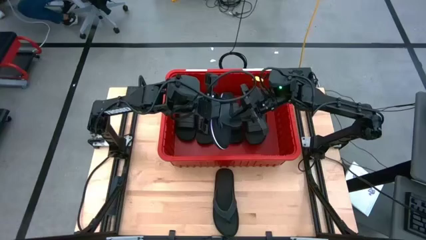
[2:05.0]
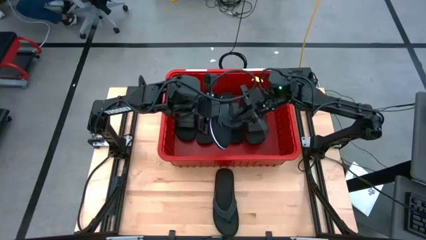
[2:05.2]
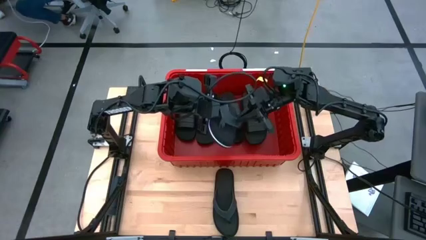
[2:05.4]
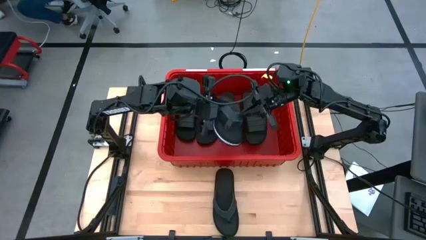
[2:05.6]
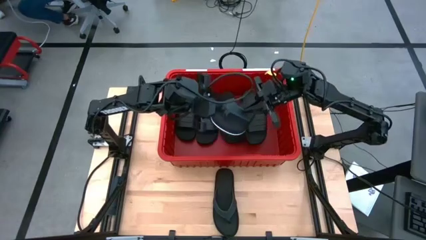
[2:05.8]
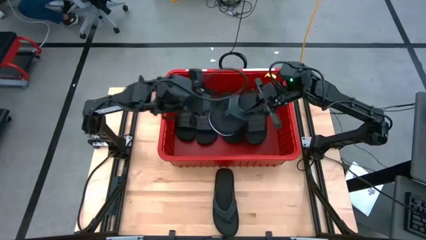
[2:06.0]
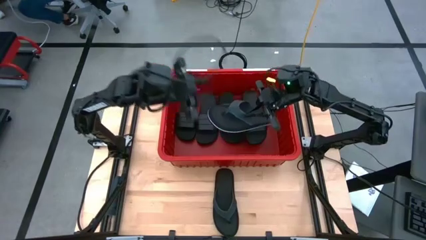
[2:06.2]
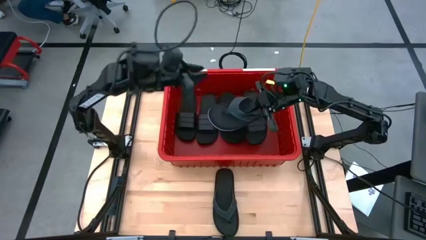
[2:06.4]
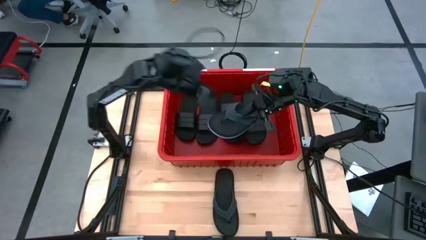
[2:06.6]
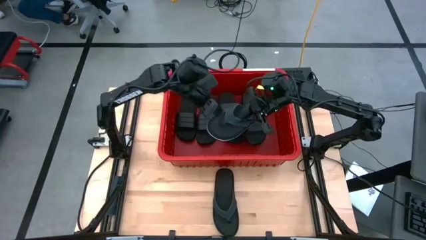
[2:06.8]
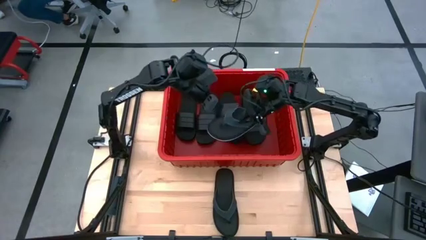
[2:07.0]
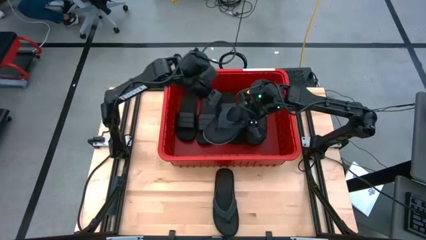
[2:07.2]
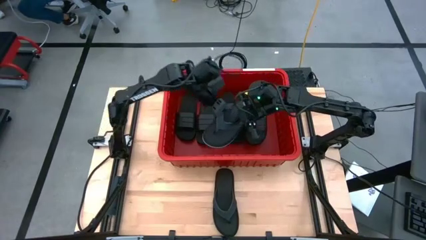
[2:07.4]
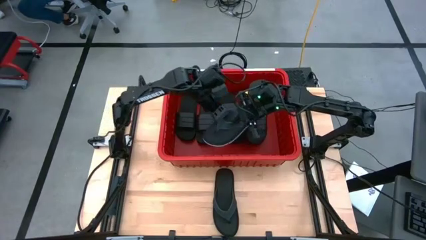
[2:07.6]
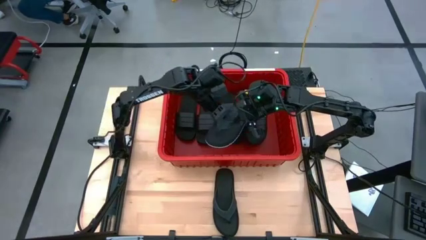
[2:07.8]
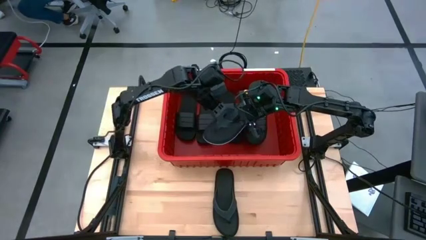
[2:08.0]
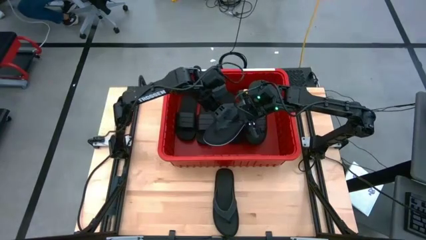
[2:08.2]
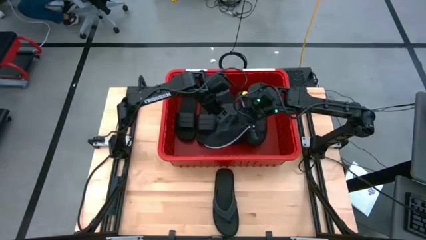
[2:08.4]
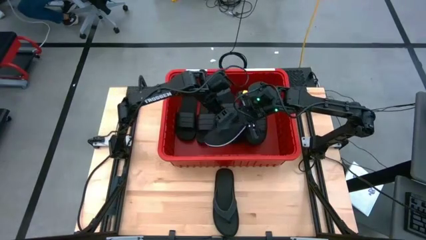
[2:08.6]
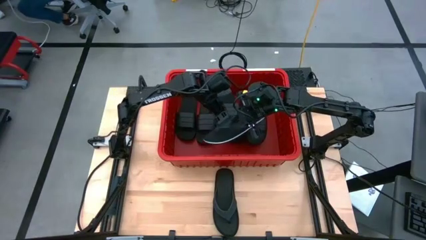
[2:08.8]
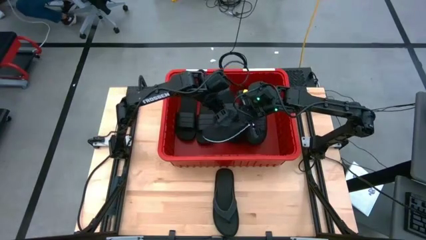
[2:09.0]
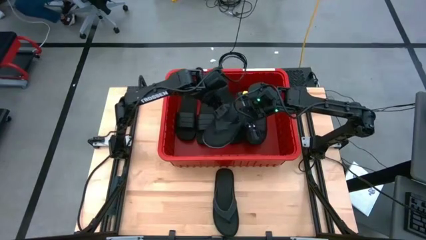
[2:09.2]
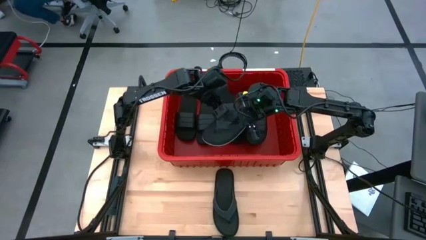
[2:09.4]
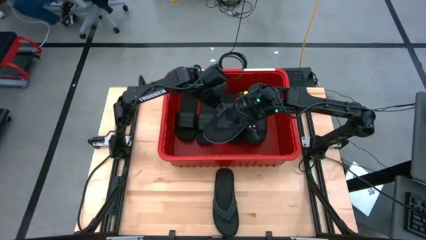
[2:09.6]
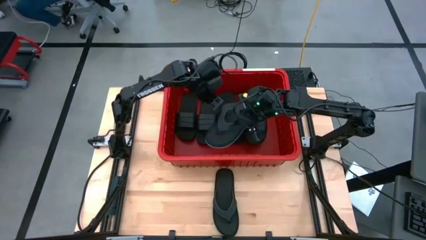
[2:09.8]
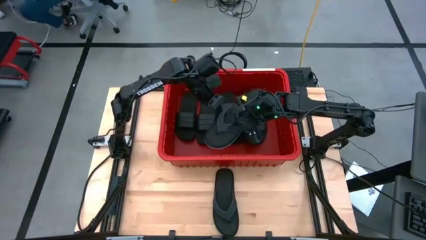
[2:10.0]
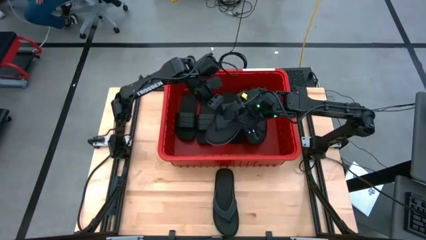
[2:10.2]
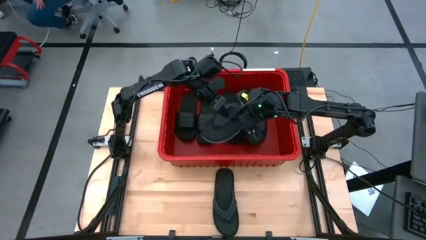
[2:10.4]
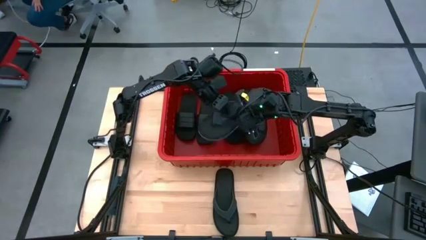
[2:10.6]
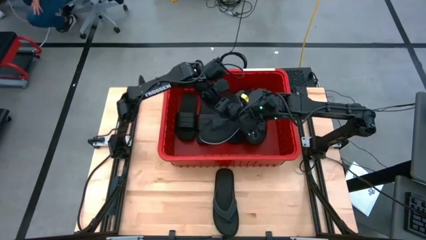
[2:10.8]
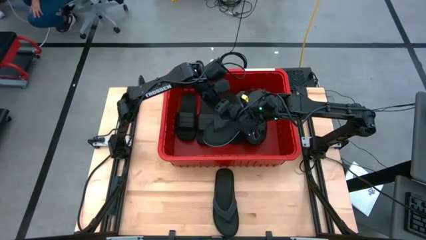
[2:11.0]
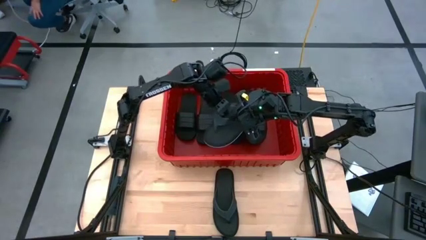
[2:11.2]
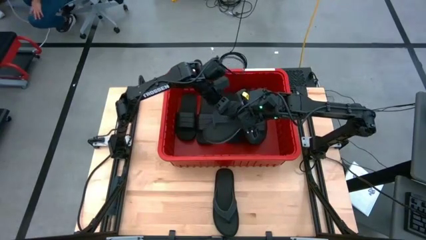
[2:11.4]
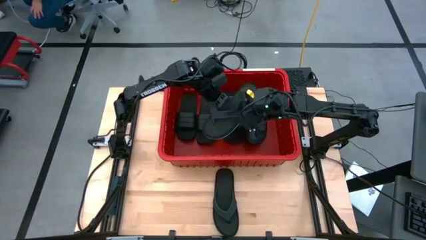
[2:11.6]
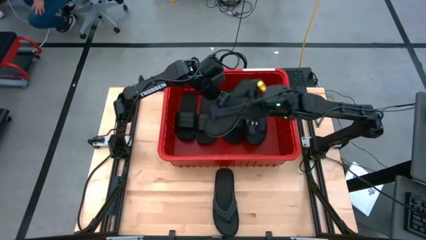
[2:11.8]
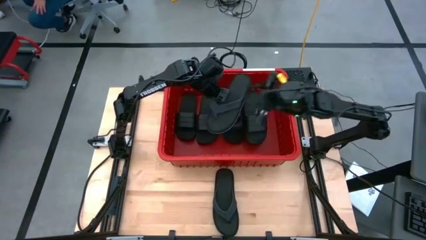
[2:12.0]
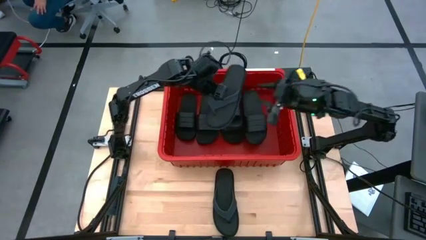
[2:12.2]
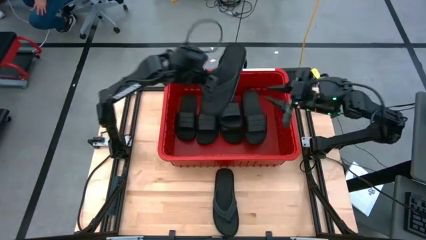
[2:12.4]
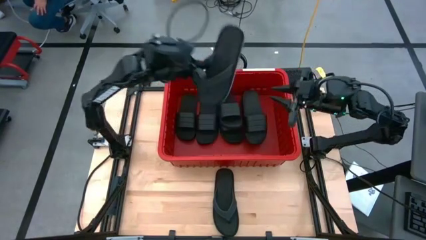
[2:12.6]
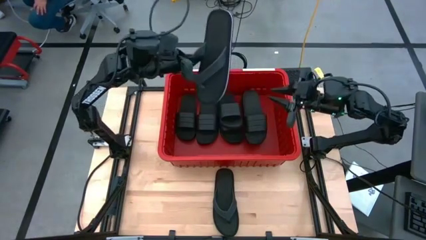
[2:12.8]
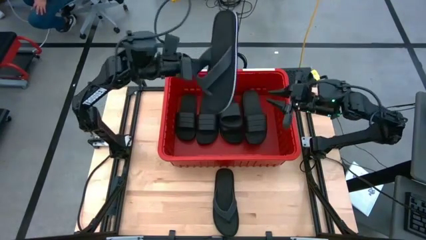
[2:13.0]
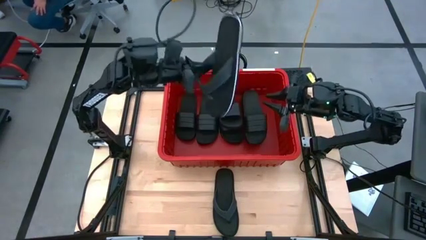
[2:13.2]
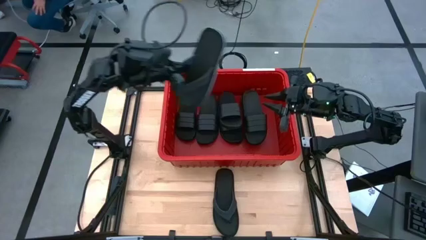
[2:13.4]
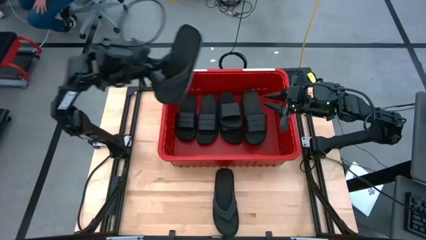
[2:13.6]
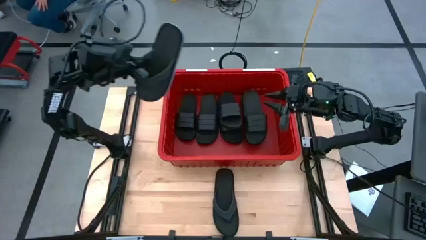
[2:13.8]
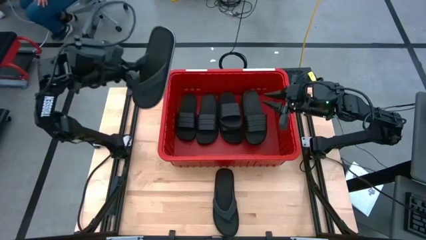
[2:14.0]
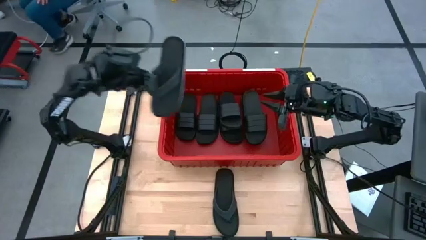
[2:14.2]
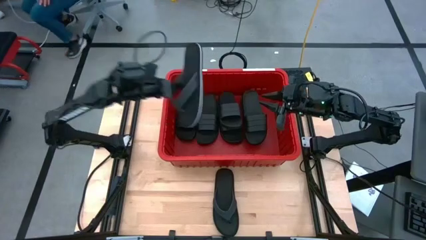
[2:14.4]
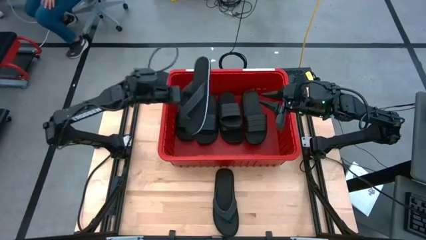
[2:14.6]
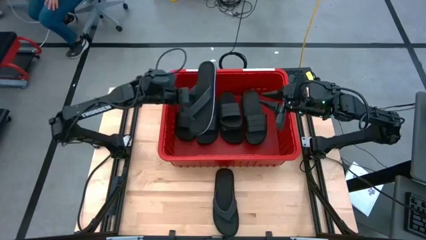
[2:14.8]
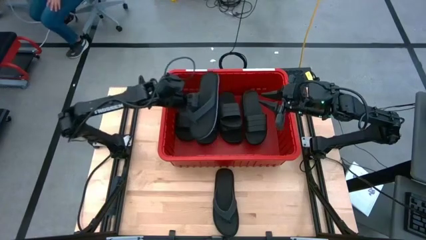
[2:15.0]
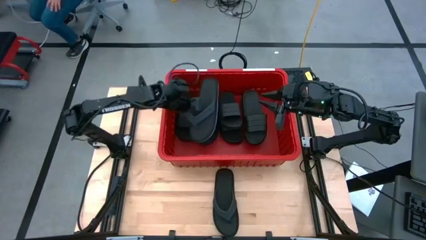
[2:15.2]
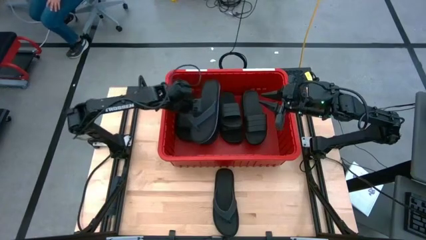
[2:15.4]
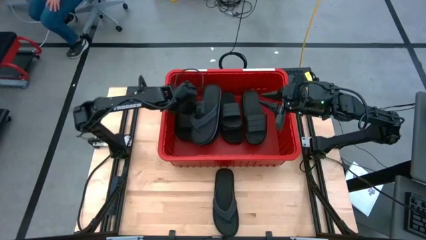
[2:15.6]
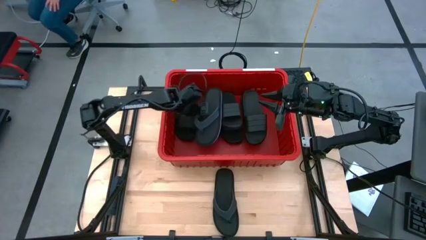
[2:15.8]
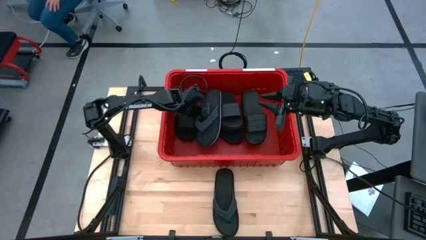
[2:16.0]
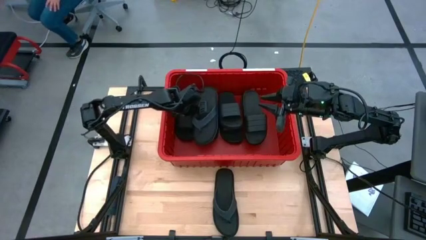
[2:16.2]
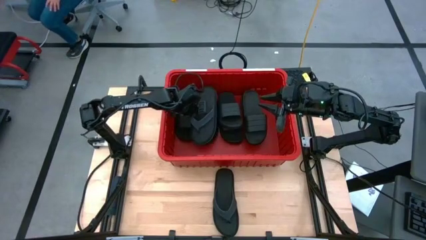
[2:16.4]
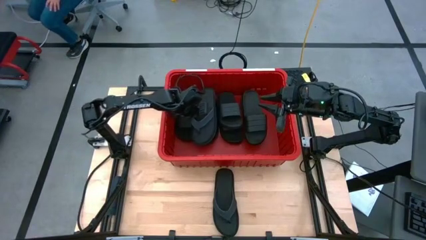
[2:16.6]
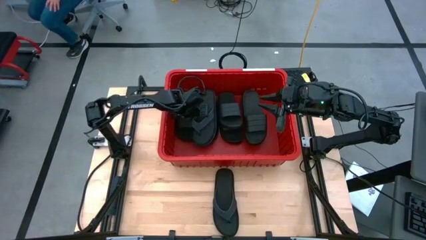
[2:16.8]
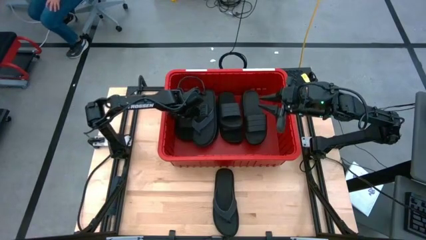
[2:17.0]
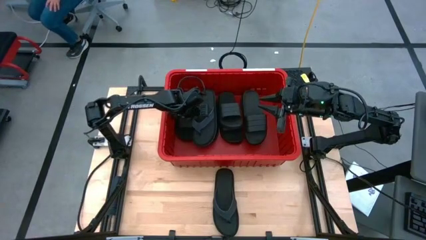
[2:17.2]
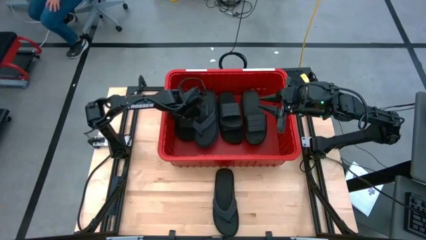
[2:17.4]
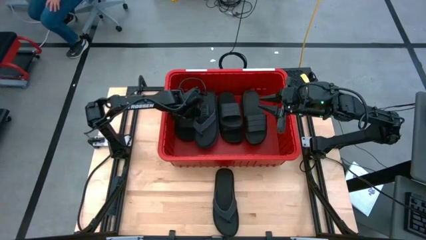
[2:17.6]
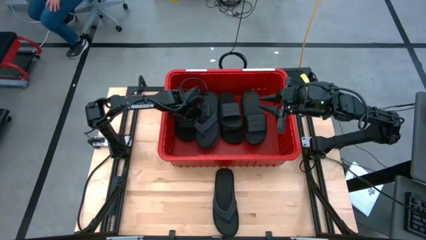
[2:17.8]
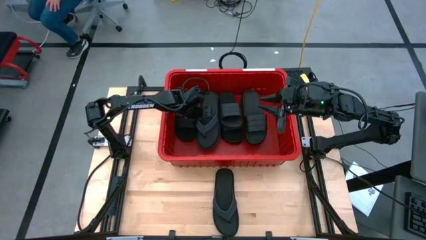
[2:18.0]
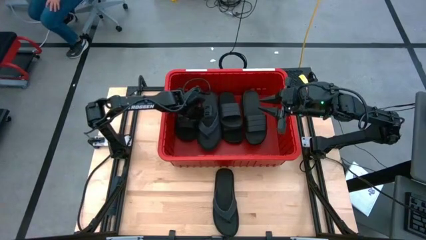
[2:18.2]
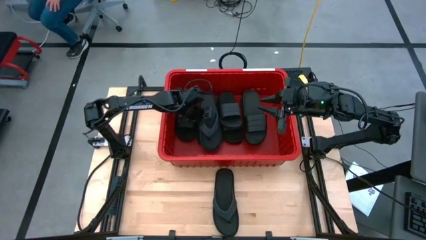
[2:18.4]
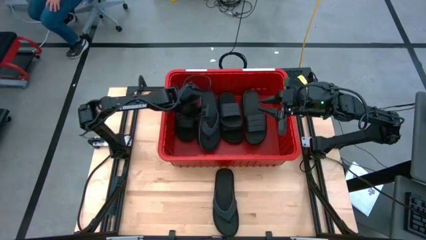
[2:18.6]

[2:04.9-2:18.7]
Task: Pick and place slides into bin
Put the black slides into the red bin
